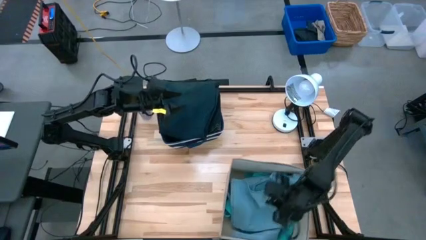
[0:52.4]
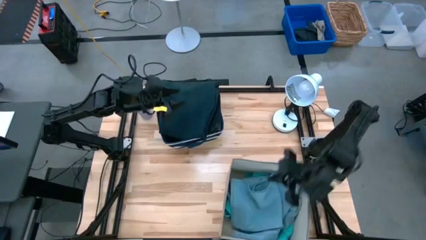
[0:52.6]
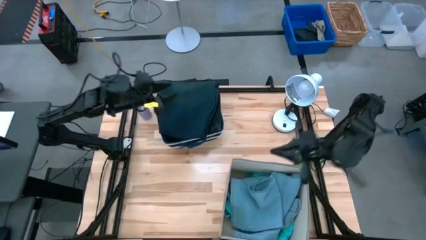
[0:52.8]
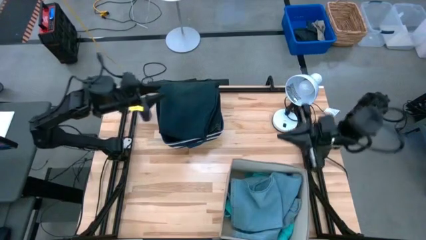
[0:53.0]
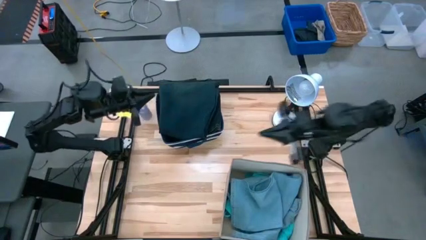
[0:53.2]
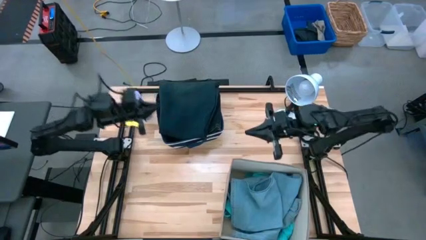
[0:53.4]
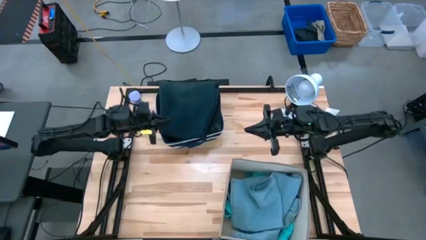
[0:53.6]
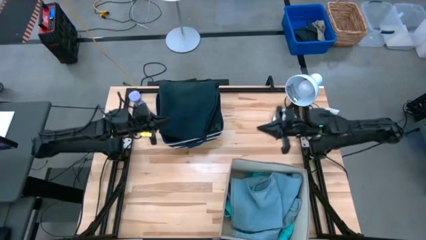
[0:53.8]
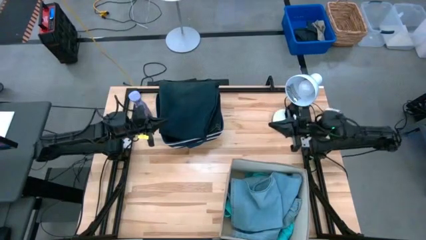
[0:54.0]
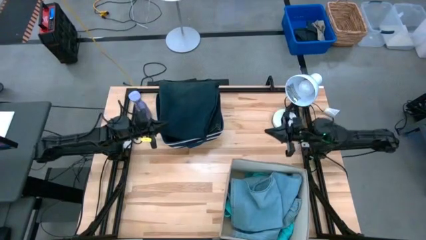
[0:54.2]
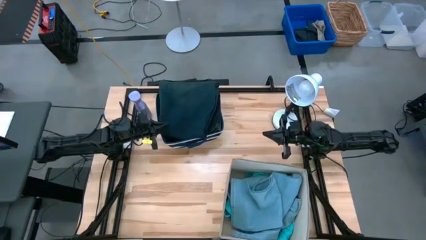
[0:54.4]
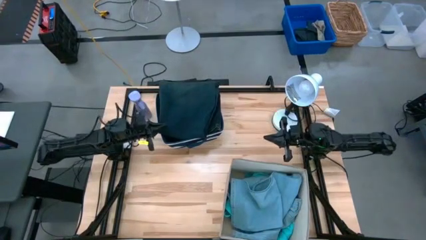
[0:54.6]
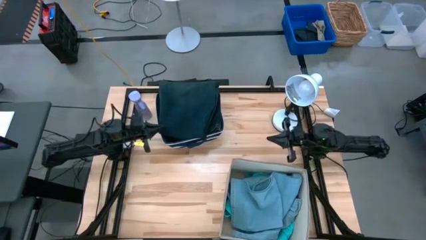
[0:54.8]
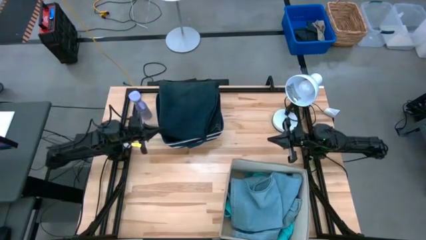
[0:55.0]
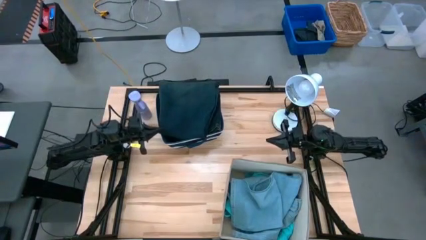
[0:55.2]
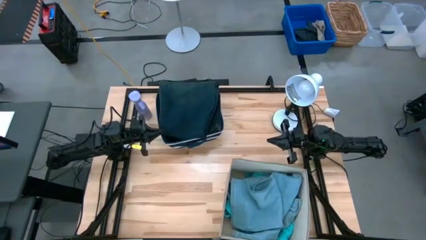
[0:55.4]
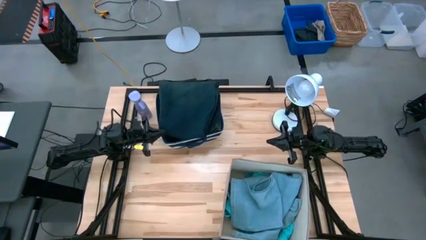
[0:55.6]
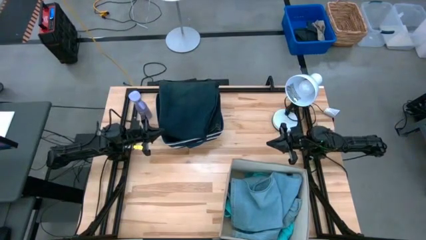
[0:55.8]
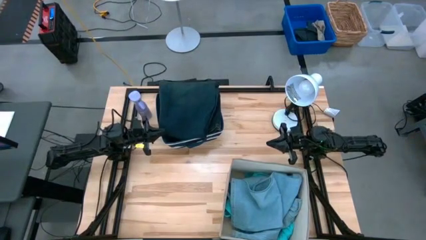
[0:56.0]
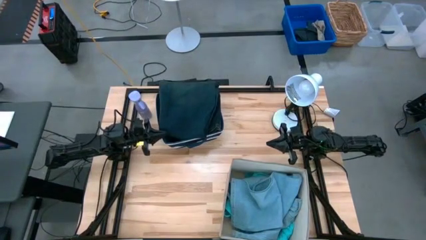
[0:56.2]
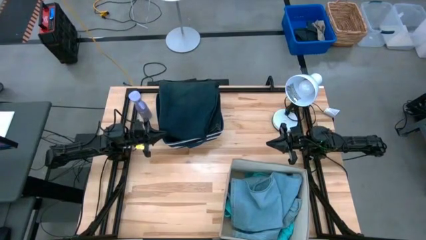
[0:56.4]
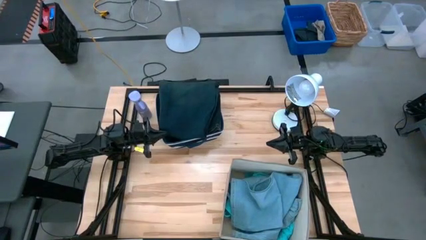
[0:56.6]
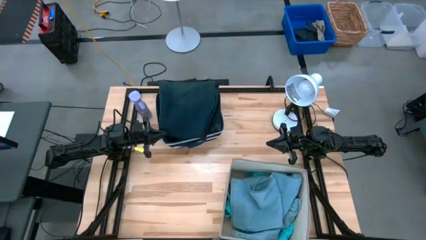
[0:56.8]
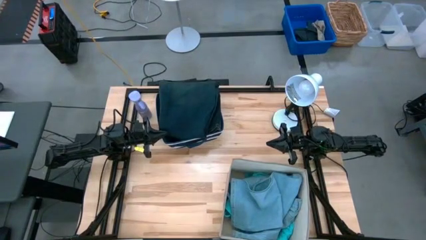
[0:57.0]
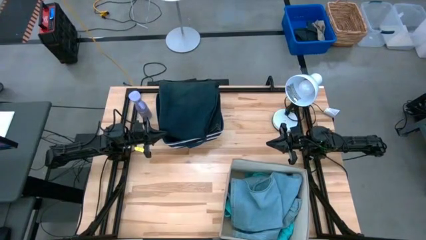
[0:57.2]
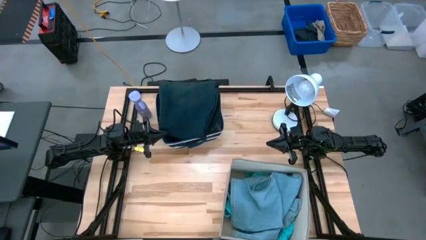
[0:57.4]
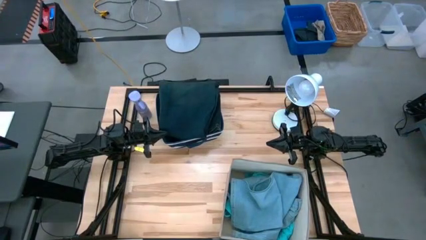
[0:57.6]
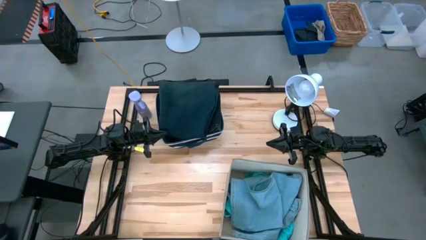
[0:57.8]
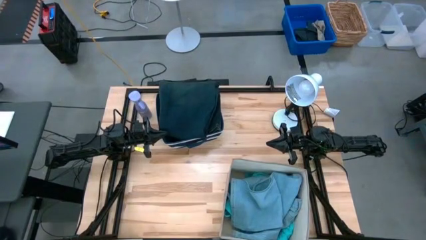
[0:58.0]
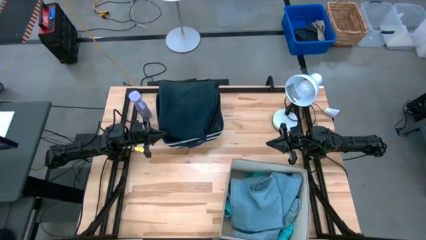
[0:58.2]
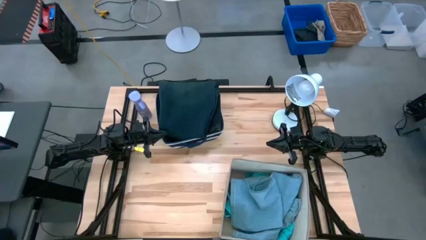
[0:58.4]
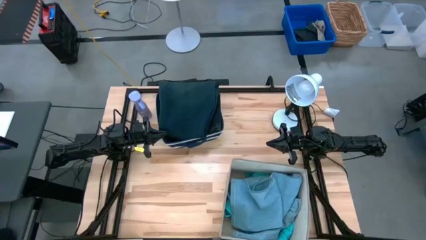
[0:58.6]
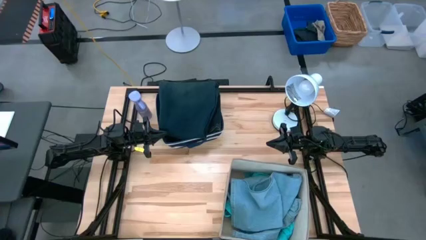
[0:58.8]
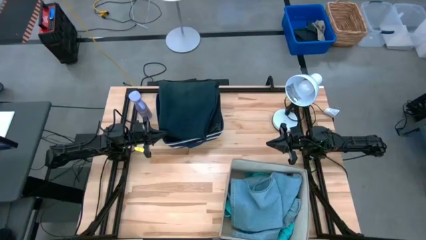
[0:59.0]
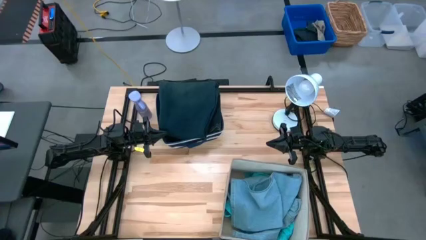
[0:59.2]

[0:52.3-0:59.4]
Task: Sort clothes
Return to Home Position

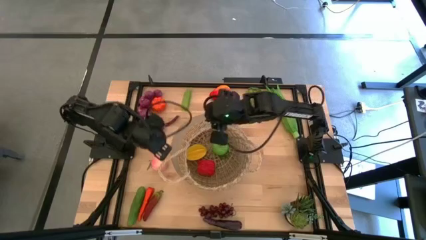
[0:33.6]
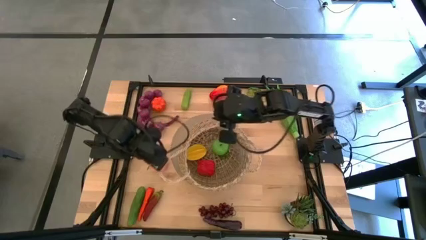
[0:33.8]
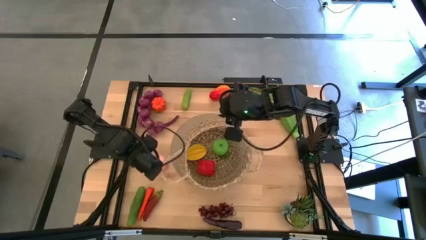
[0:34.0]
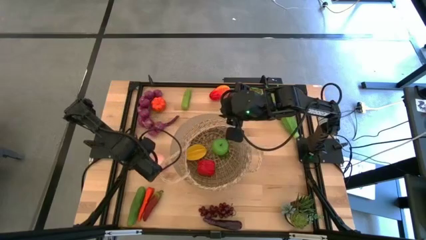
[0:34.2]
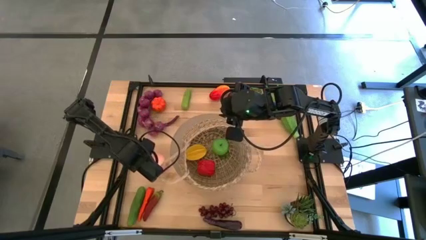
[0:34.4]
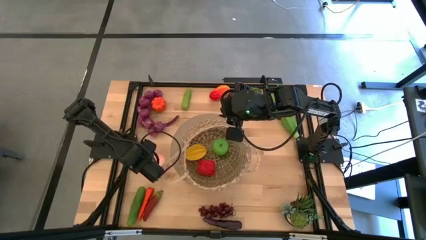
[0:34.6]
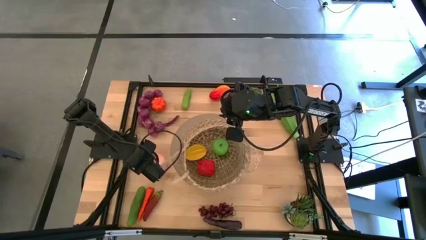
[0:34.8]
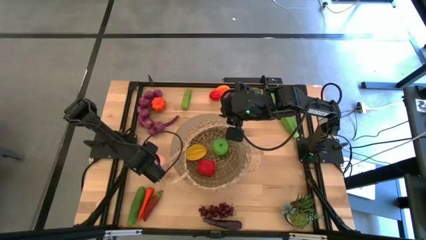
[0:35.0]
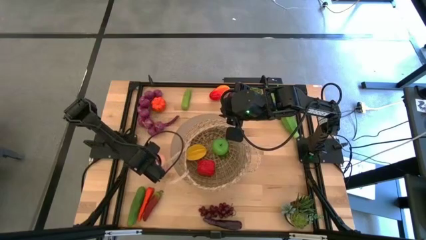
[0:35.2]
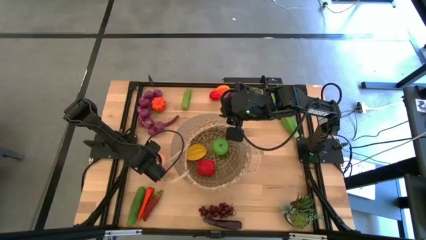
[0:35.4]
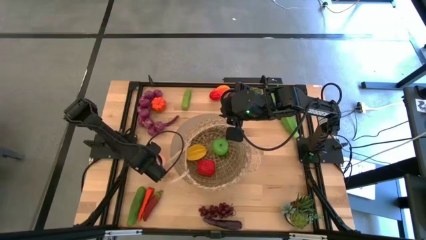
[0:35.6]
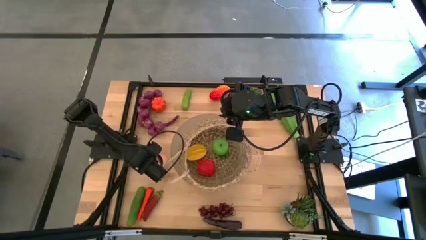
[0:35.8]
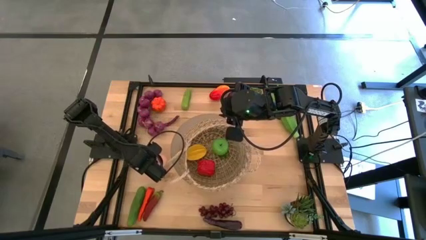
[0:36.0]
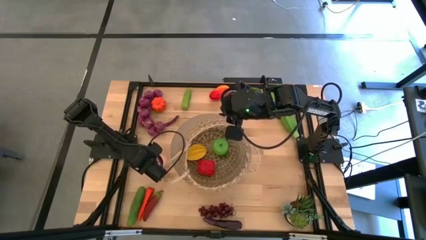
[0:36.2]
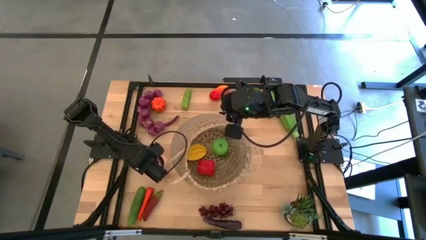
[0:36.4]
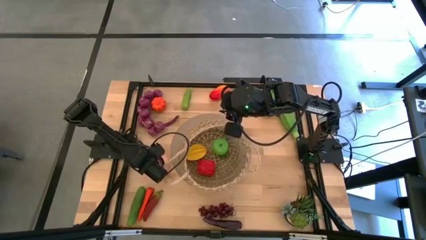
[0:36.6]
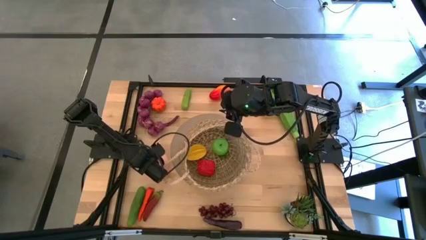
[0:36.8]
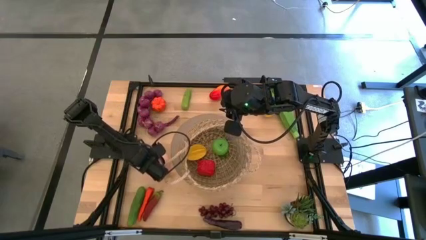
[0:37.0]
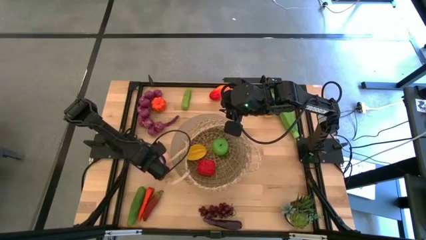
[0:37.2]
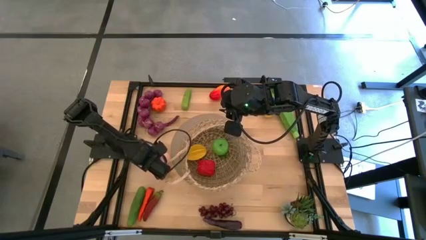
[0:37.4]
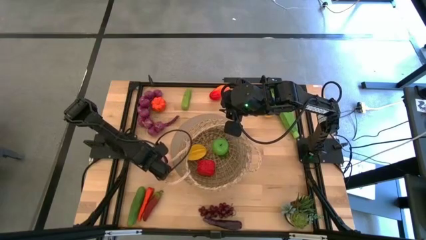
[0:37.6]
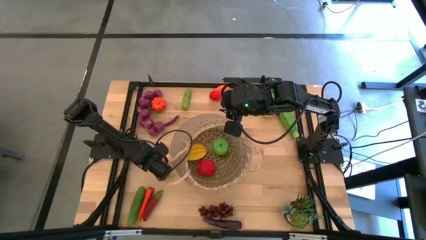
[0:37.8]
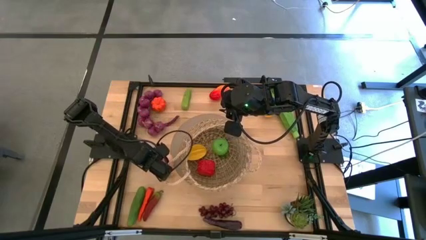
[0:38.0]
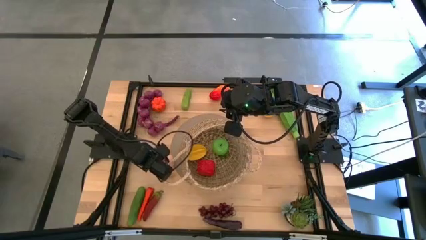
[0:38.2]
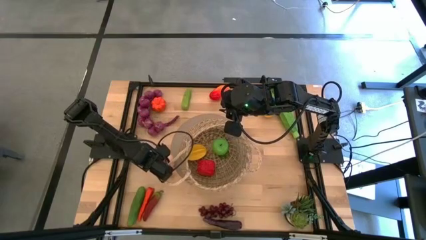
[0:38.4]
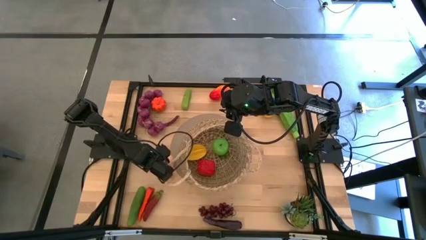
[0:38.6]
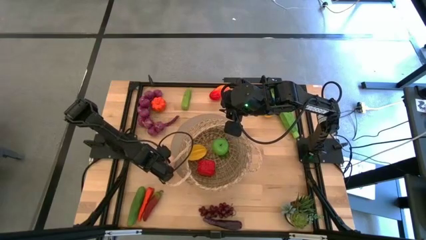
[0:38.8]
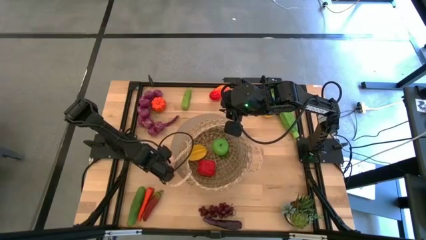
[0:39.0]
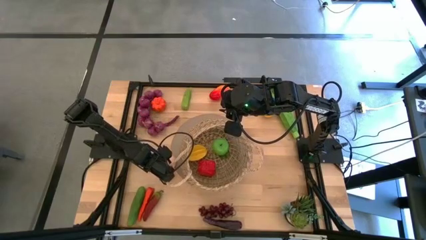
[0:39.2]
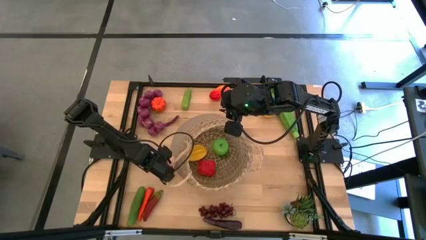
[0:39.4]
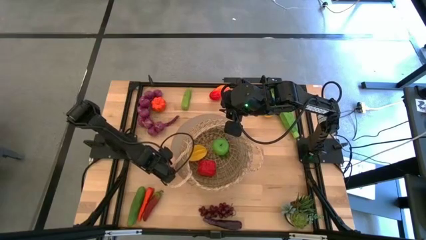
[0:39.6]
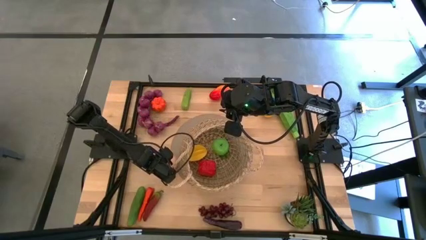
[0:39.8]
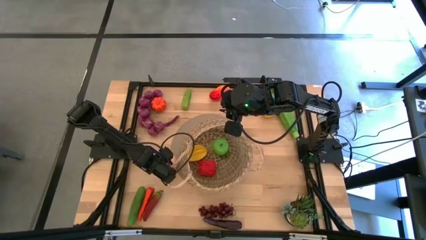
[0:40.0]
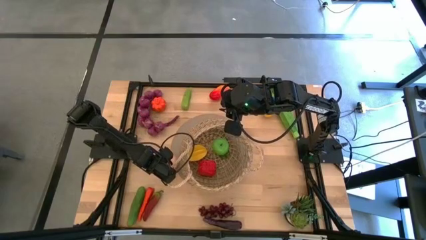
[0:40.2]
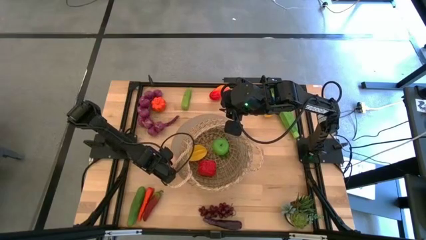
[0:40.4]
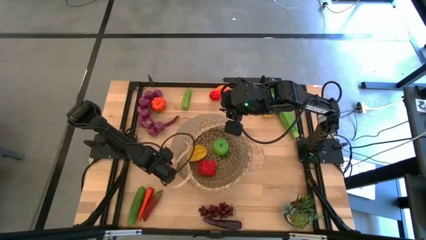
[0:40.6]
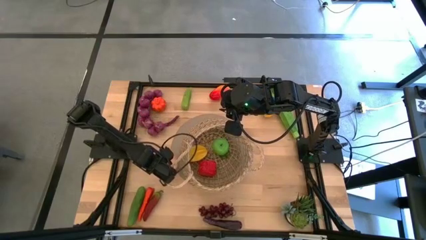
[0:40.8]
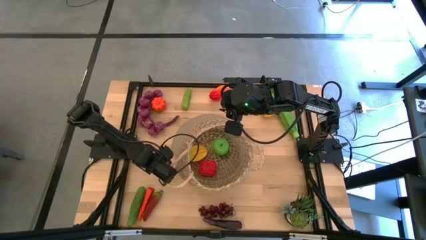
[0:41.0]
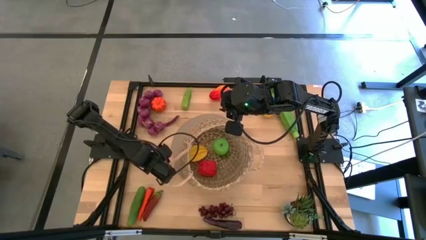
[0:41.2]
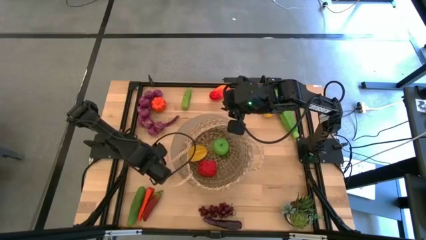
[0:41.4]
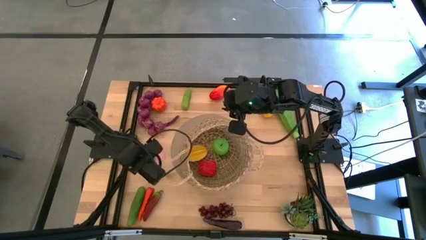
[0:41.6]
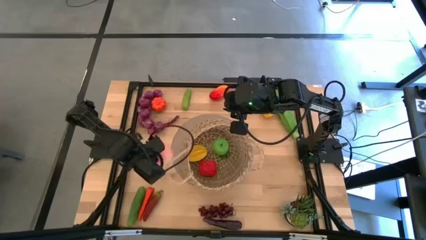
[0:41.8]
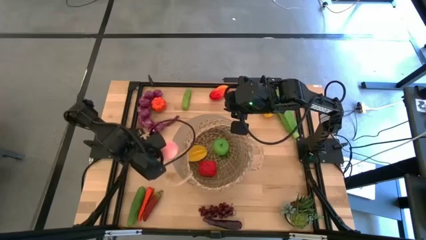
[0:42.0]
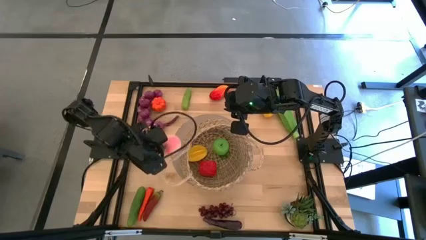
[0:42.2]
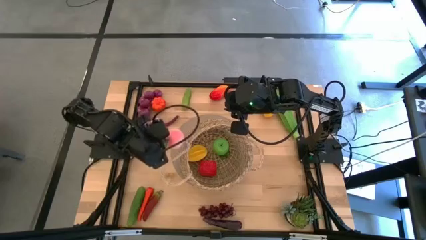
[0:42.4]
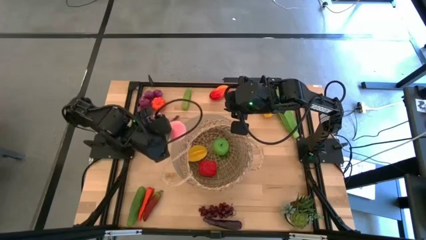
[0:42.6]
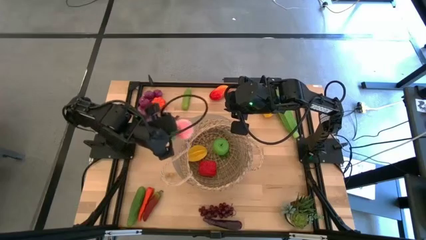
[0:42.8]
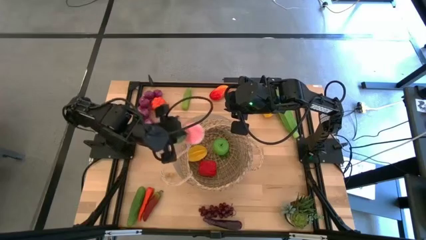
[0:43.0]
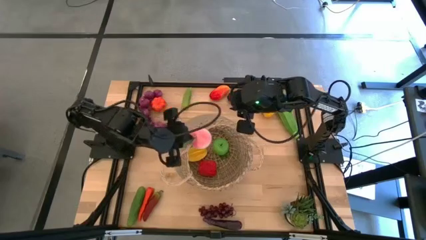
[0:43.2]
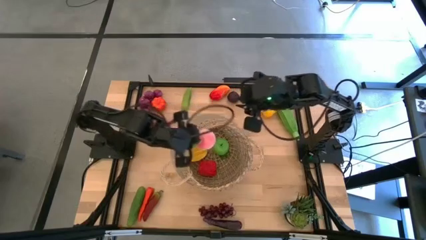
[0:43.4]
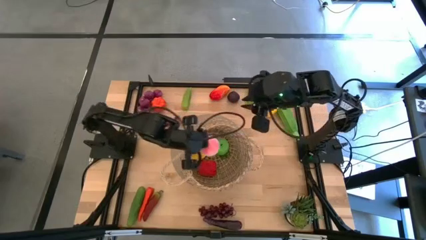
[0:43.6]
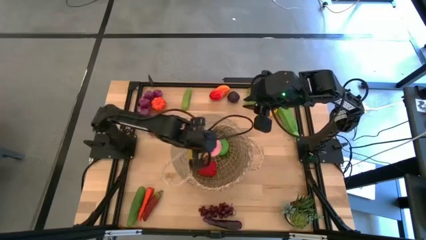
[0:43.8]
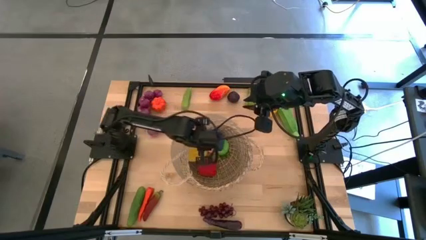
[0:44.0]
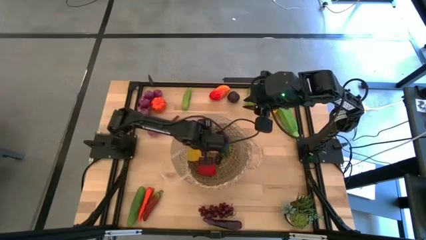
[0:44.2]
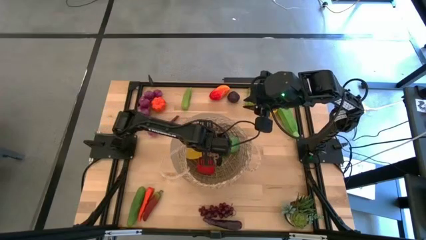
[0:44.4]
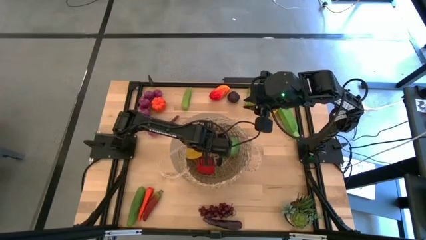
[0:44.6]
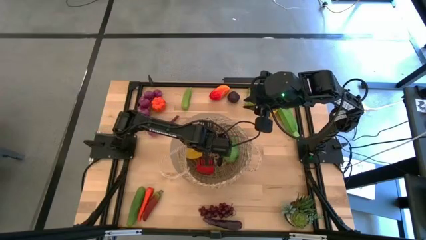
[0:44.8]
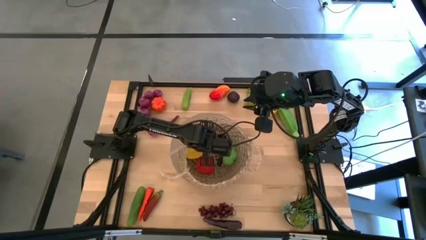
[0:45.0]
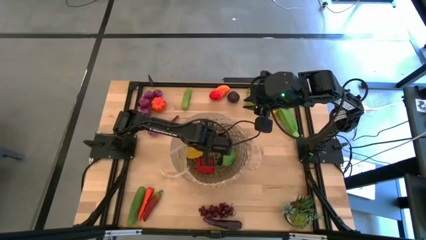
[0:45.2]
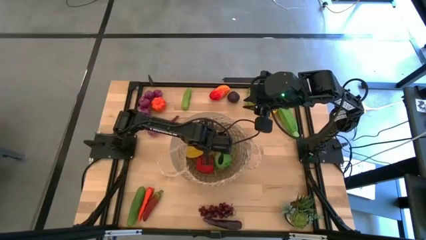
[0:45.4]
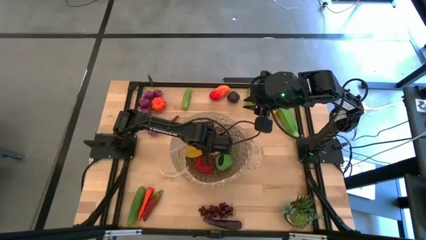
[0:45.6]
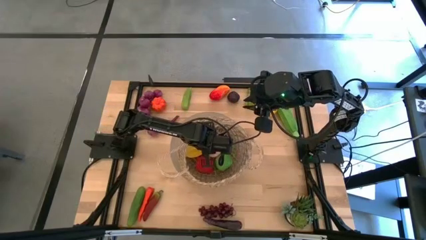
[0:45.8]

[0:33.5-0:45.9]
Task: Build produce basket
Put the pink peach into the brown basket
